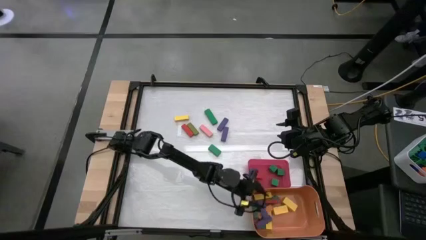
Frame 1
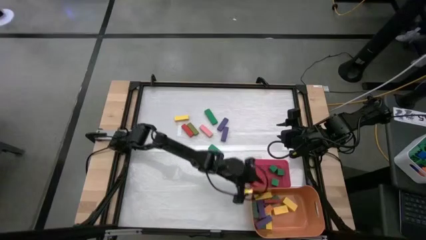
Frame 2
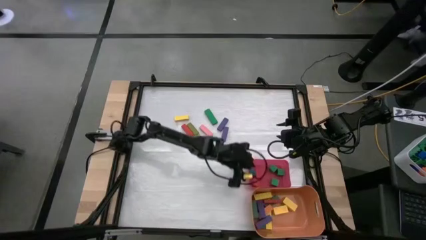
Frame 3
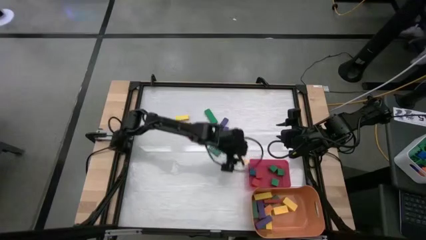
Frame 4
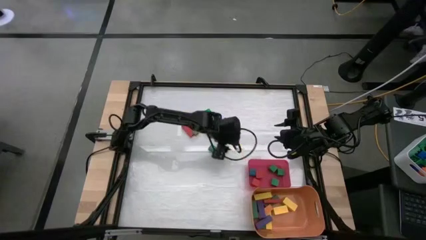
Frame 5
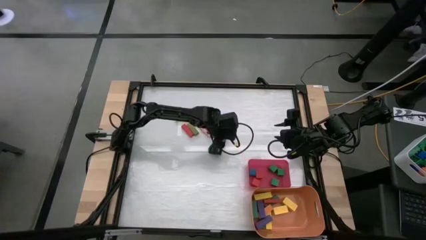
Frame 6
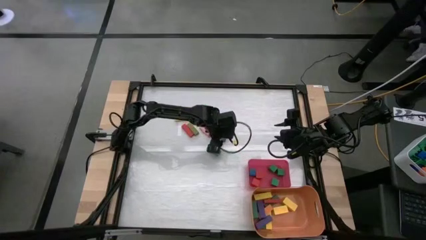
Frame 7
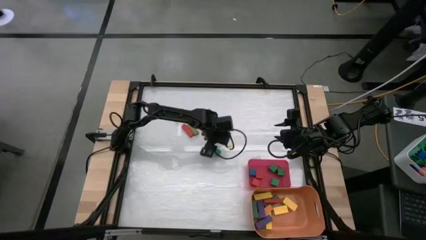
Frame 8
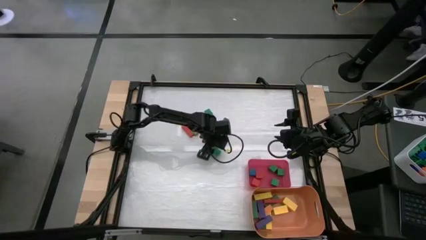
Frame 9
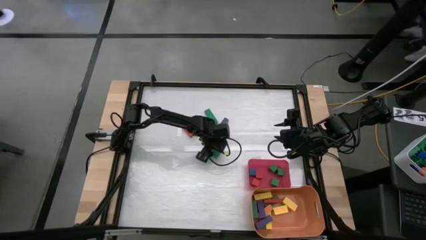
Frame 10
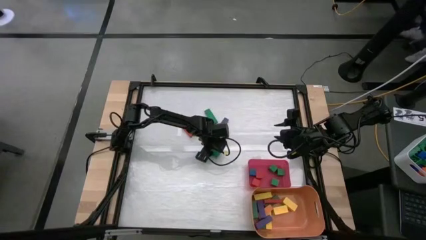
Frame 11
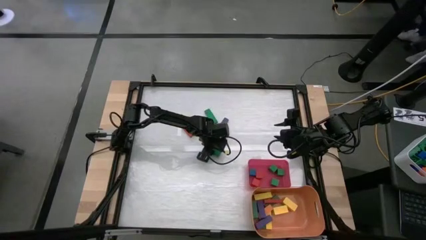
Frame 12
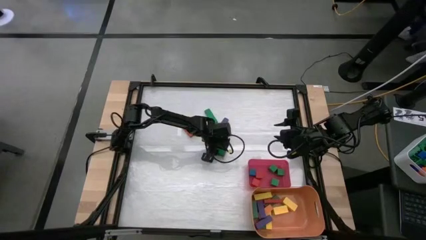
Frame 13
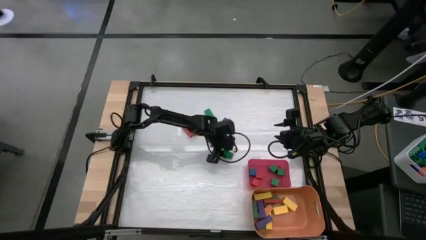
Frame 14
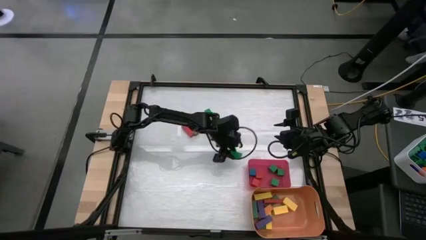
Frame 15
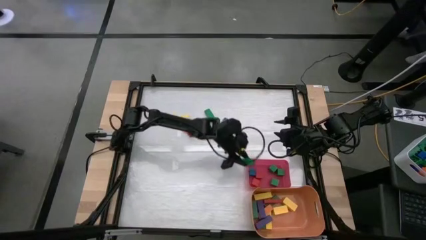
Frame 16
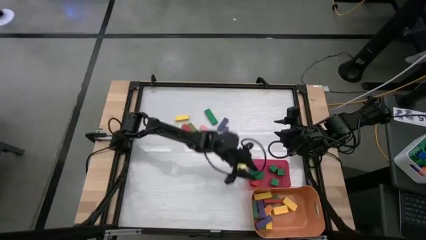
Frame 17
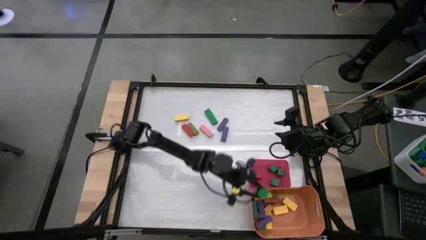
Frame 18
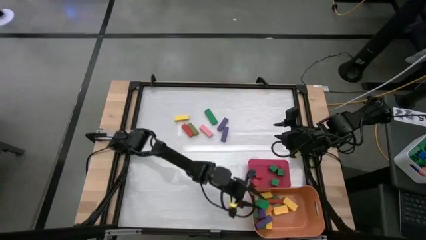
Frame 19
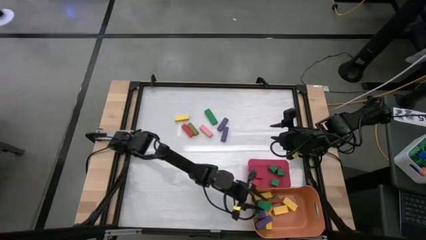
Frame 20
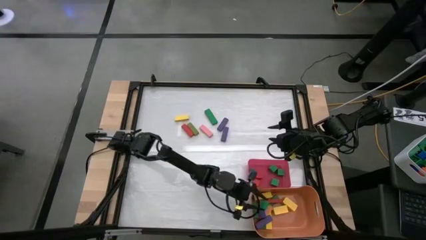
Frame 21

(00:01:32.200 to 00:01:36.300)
Task: Sort blocks by size
Put the green rectangle block into the orange bin

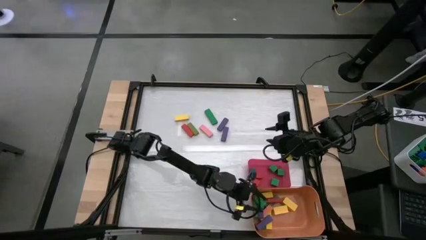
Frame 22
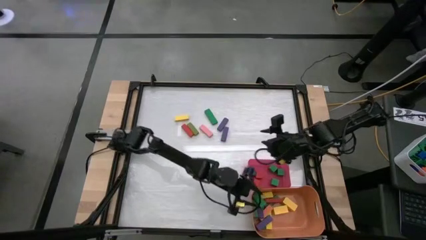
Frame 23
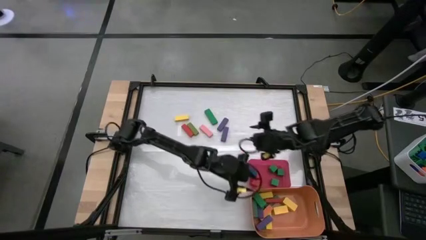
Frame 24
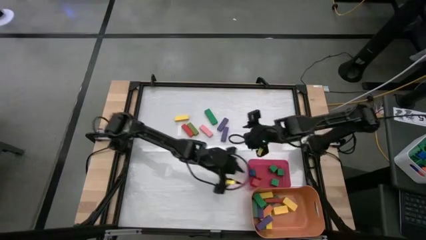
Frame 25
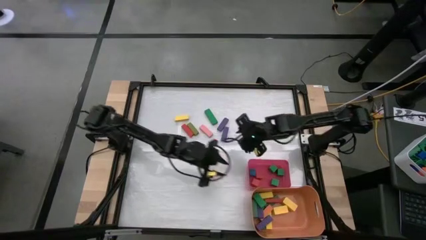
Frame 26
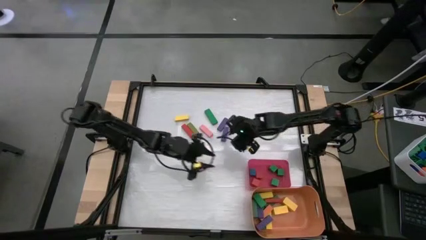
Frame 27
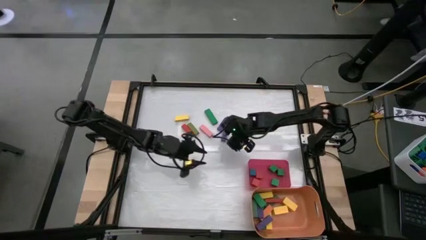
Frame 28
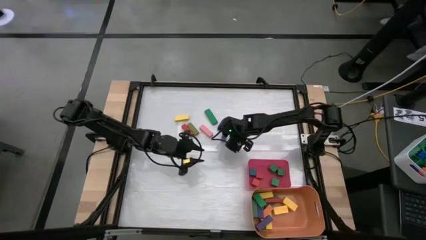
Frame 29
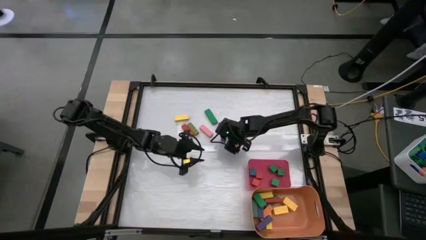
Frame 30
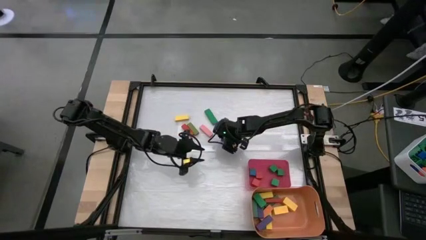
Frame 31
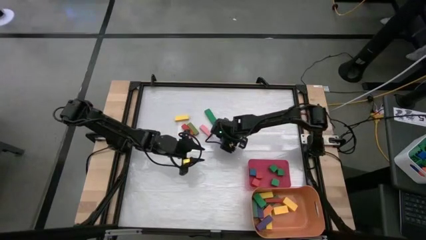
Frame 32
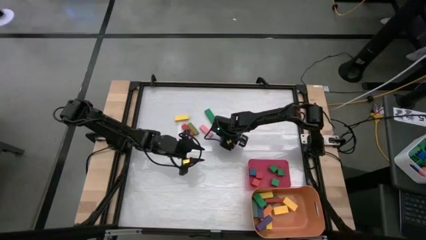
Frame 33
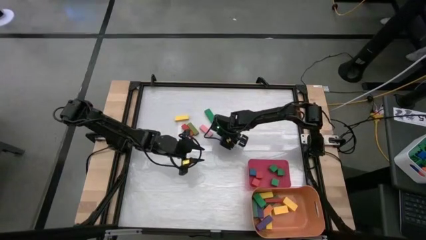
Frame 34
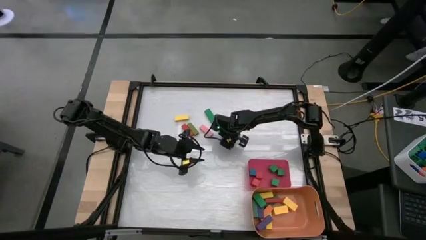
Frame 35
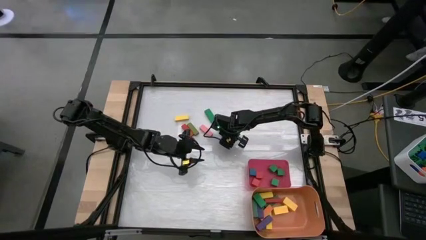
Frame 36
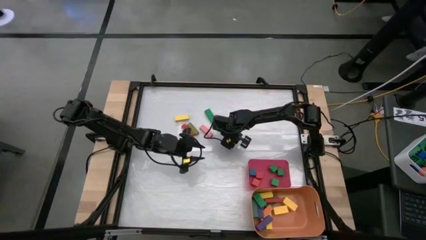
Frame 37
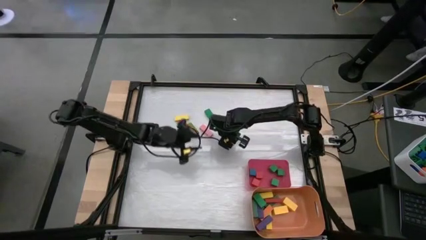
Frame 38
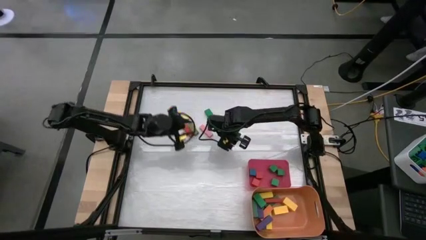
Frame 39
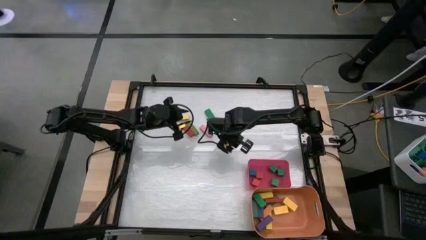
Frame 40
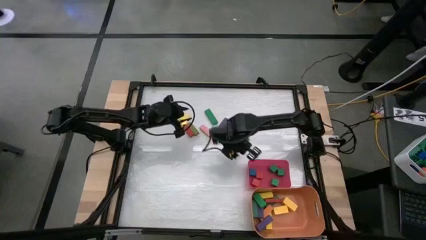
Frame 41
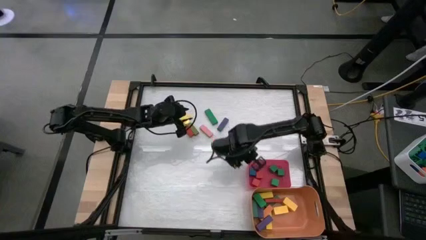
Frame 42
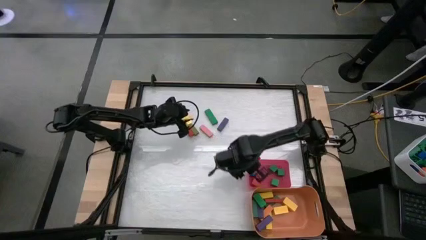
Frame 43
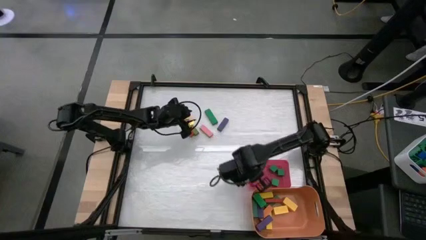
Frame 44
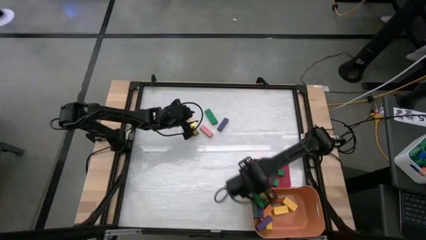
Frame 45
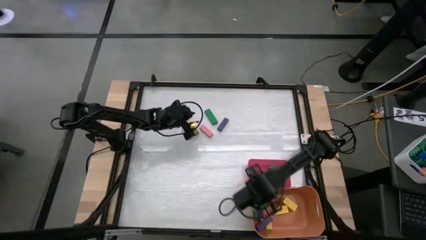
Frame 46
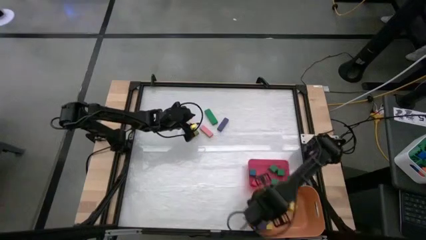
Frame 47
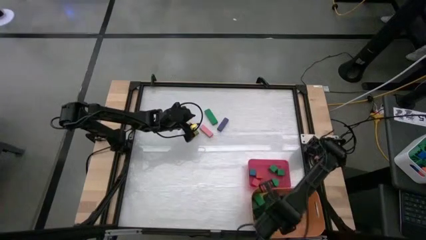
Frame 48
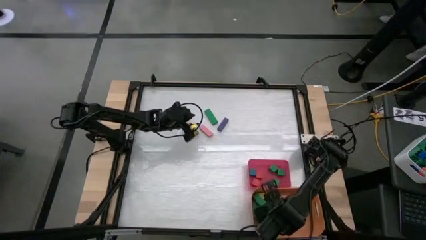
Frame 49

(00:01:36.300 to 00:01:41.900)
Put the violet rectangle block into the orange bin

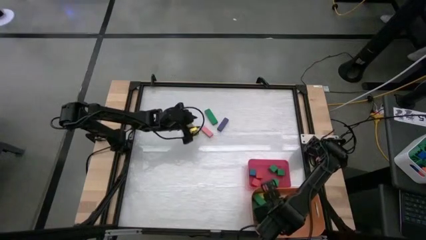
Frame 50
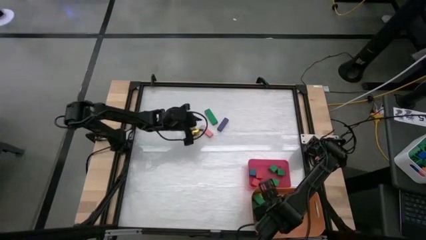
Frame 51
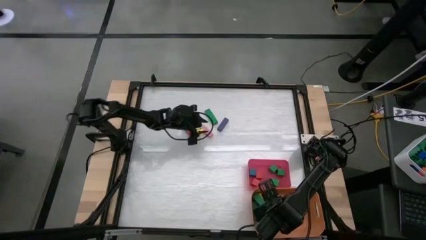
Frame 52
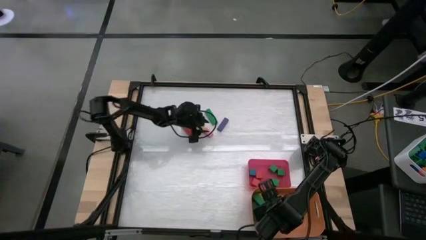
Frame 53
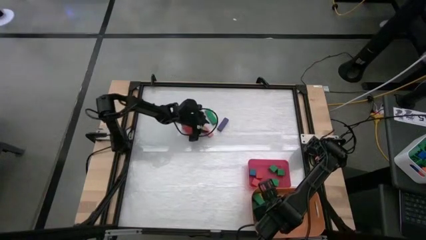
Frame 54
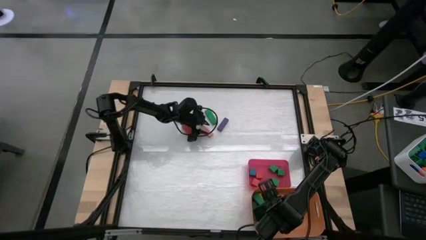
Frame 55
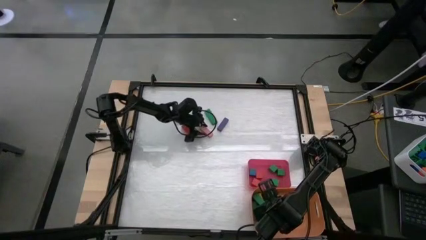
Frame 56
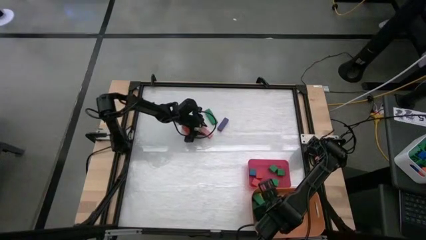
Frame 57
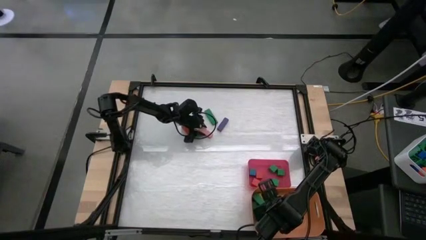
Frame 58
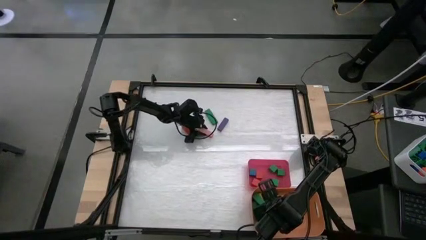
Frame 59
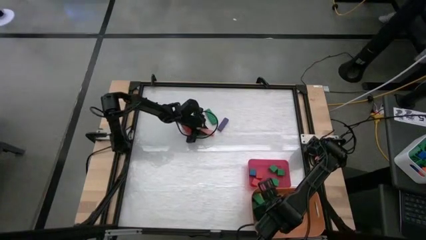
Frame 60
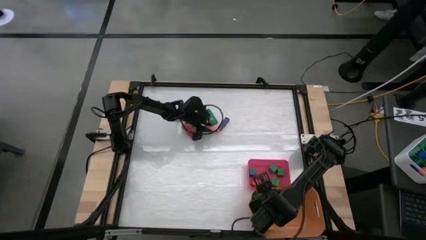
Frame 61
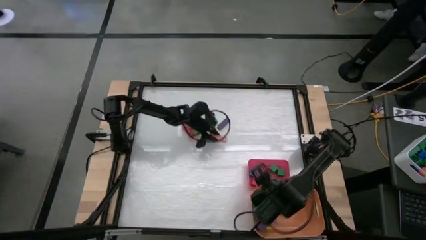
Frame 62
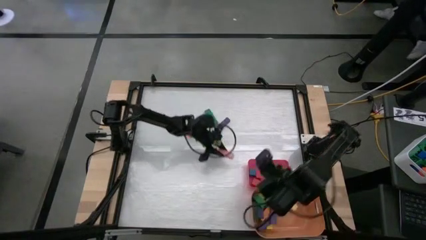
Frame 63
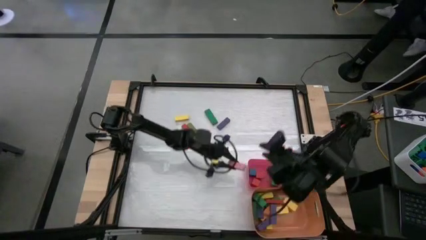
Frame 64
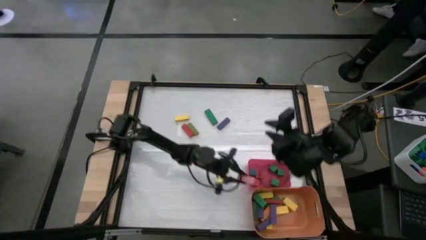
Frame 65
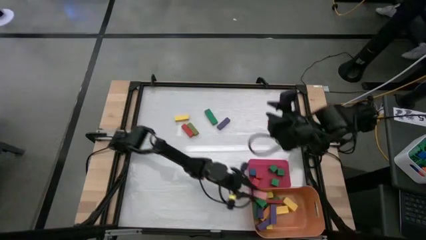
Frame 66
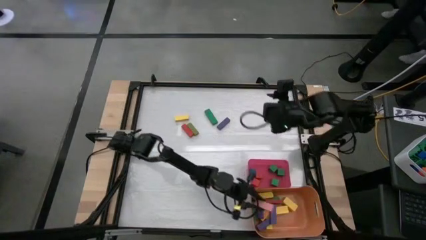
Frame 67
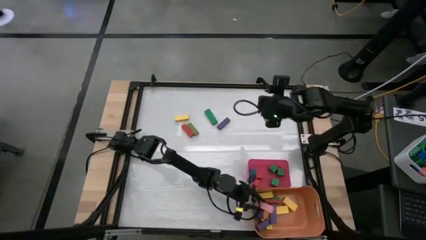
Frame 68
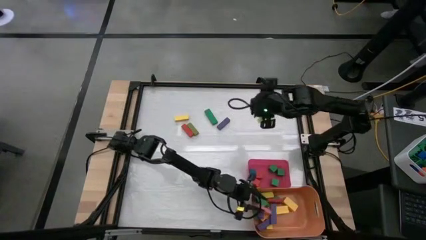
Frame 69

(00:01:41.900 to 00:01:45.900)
Put the pink rectangle block into the orange bin

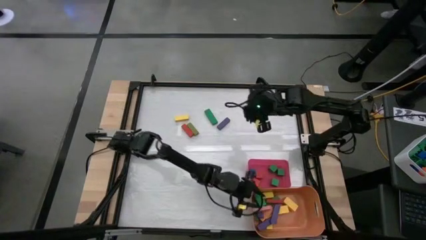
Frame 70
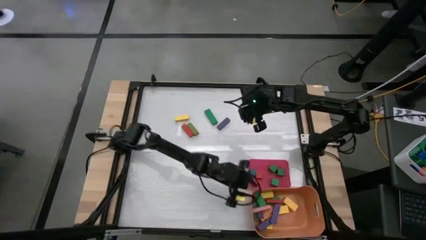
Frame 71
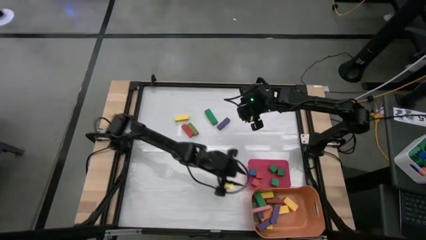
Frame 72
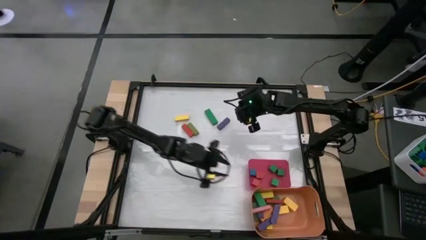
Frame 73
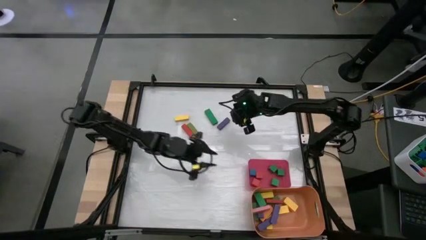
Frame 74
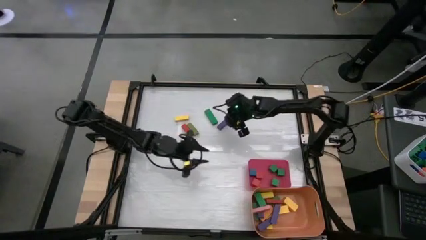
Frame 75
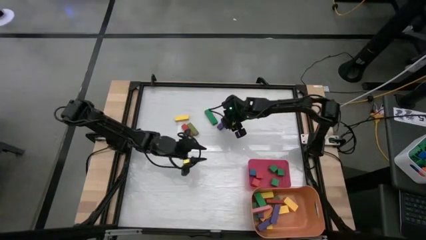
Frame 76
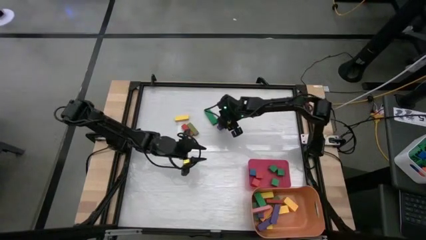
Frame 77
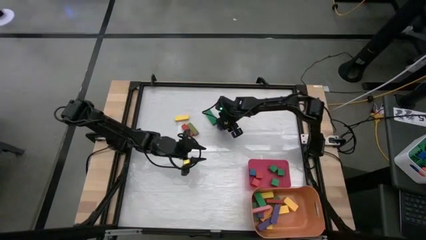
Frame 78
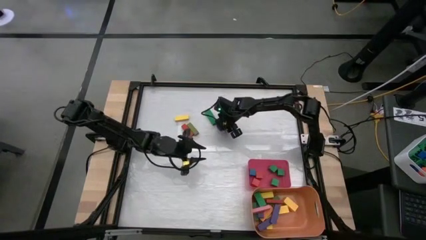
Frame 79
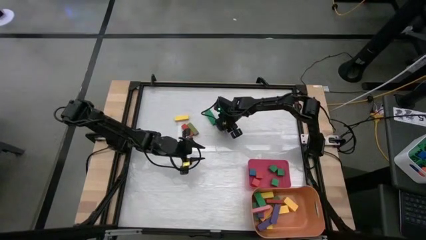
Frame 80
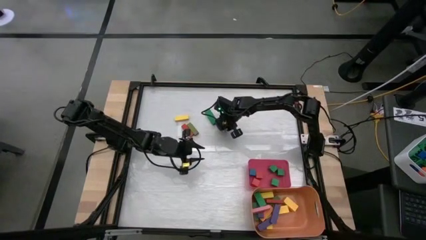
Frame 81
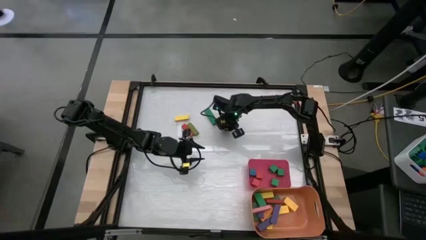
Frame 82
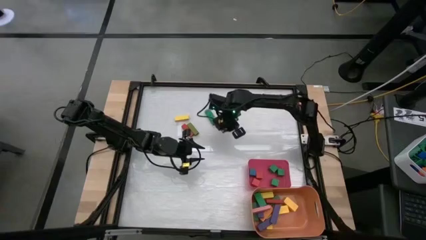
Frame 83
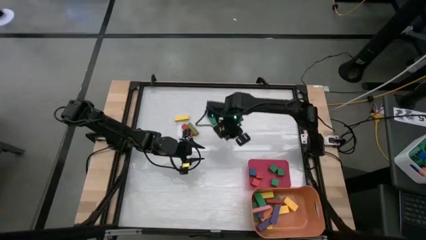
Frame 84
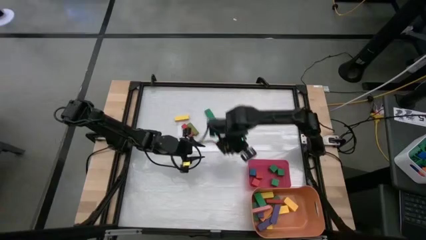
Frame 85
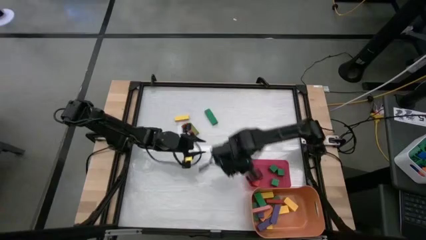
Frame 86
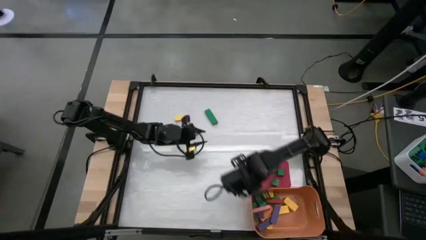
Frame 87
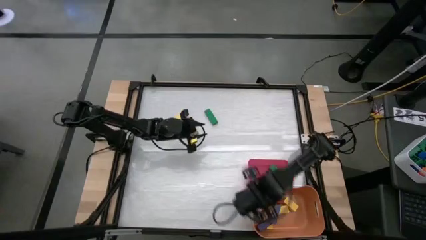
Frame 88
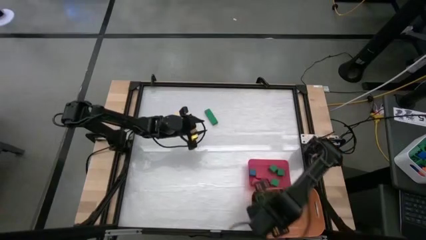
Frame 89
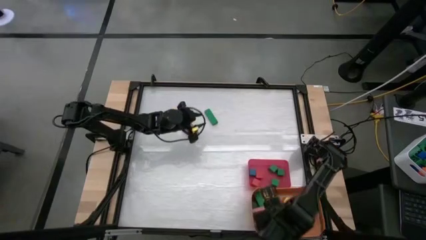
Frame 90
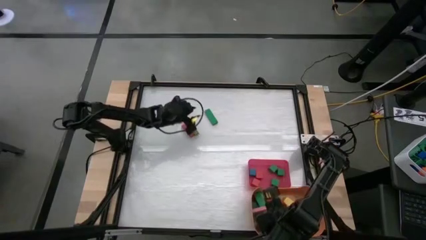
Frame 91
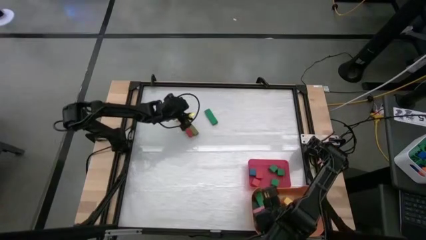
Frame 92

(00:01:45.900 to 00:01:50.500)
Put the violet rectangle block into the orange bin
